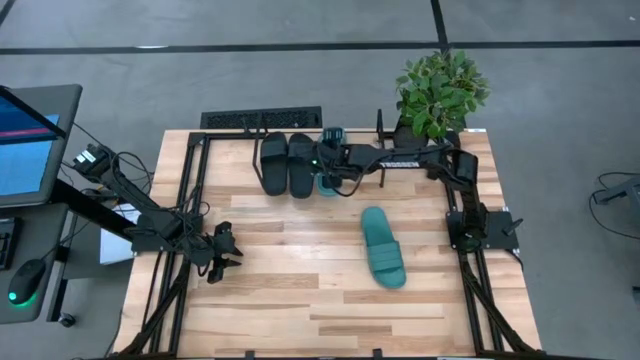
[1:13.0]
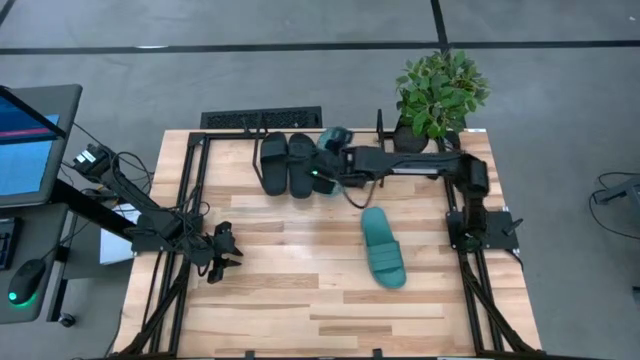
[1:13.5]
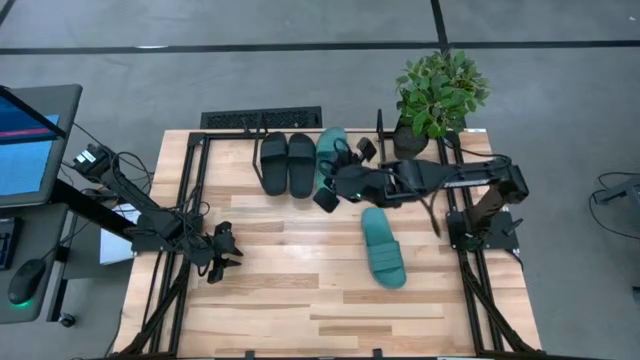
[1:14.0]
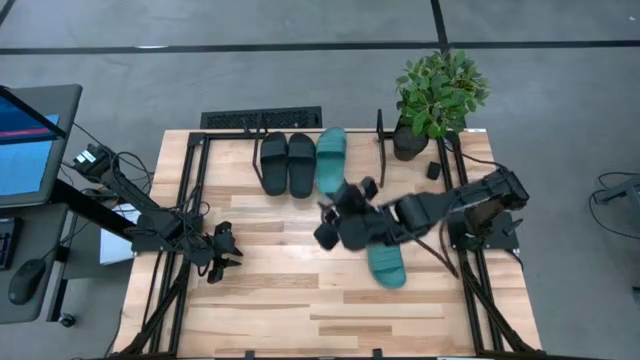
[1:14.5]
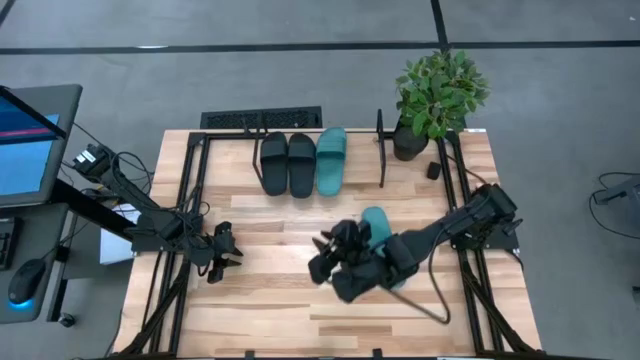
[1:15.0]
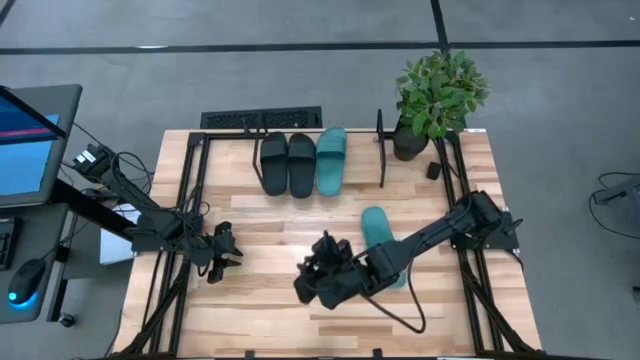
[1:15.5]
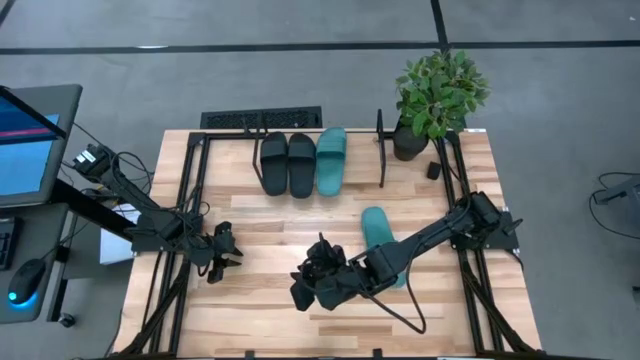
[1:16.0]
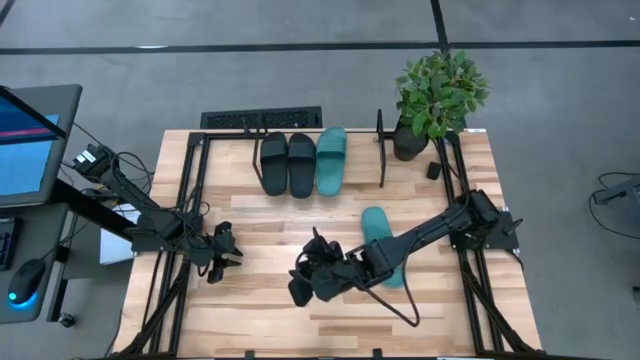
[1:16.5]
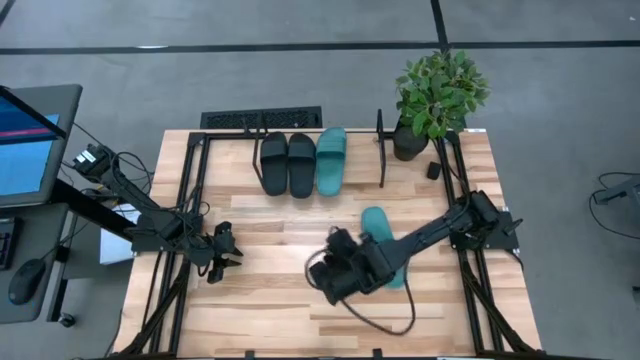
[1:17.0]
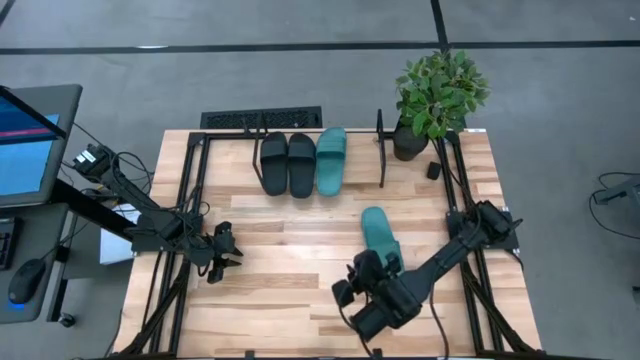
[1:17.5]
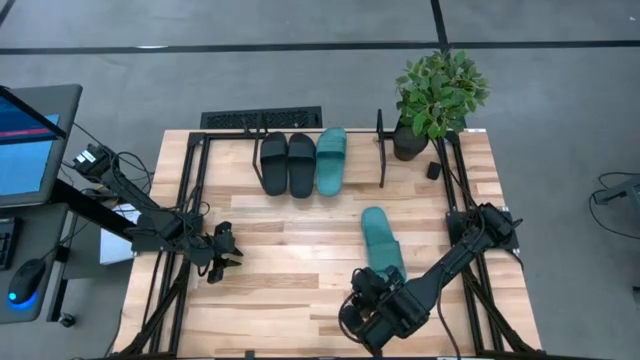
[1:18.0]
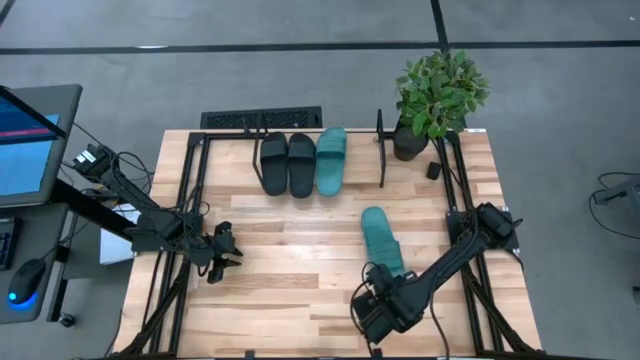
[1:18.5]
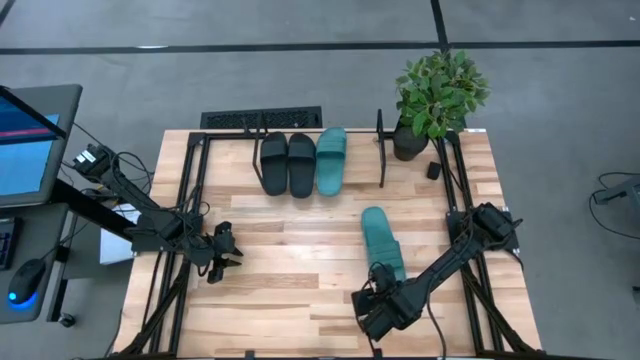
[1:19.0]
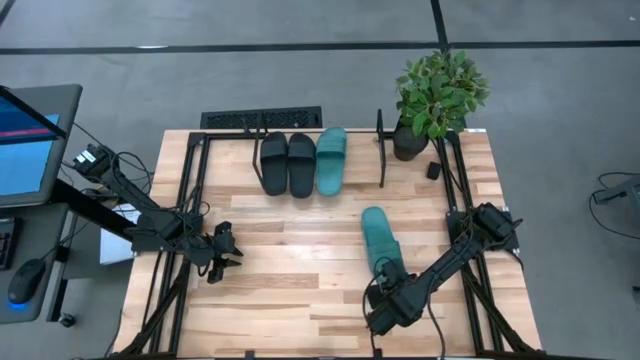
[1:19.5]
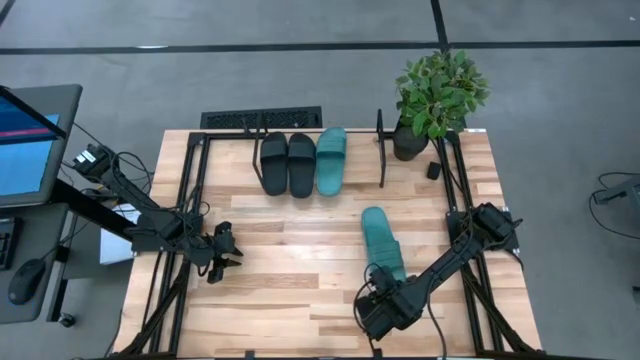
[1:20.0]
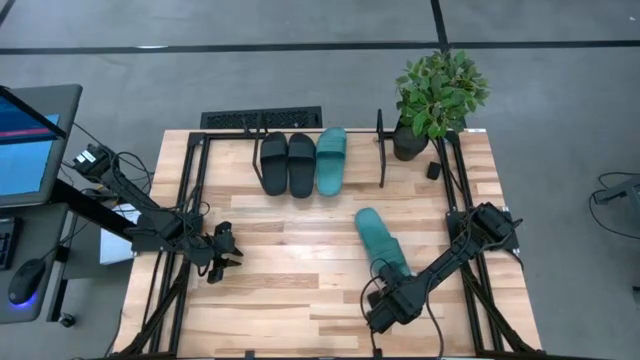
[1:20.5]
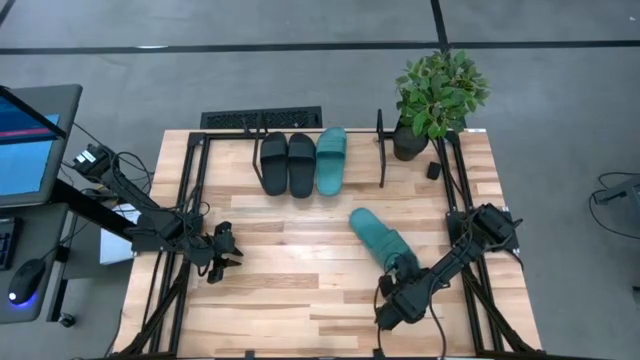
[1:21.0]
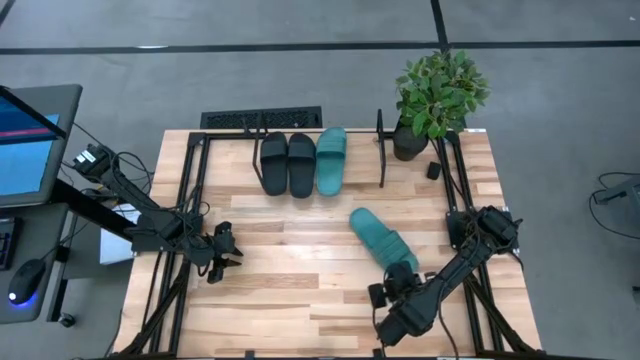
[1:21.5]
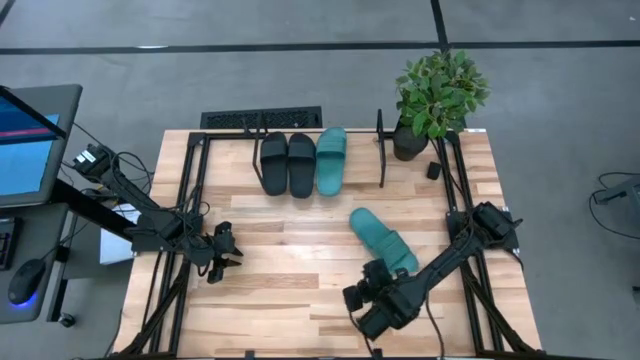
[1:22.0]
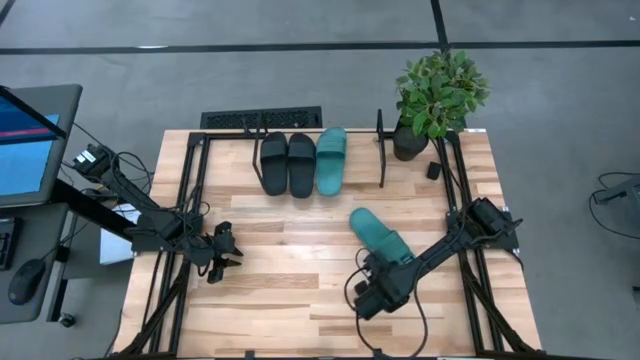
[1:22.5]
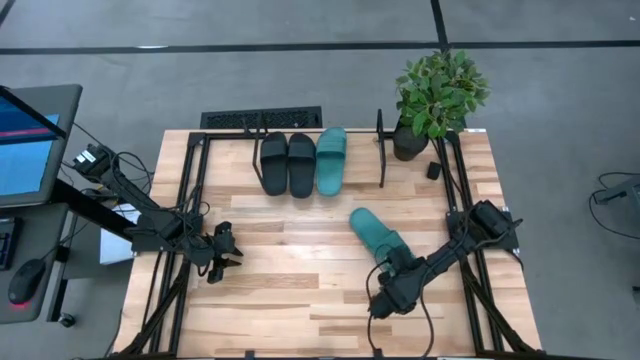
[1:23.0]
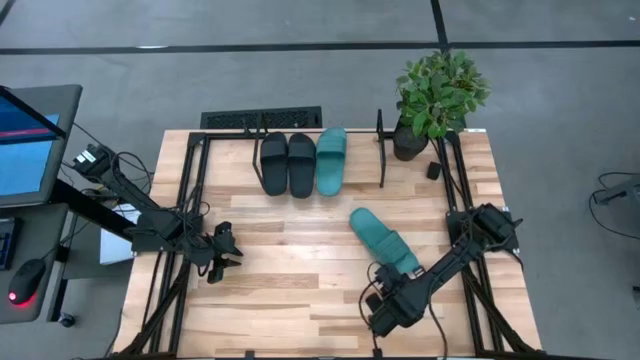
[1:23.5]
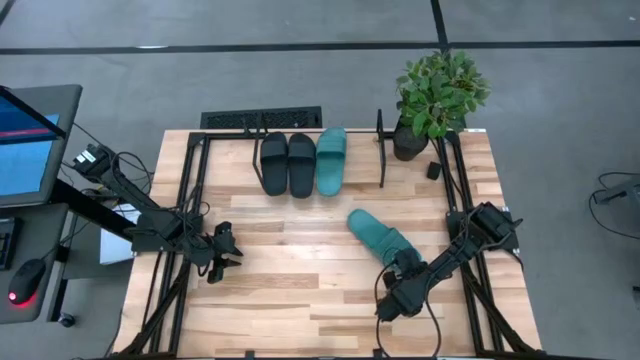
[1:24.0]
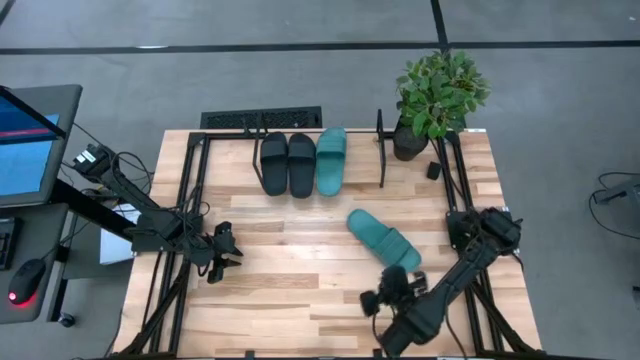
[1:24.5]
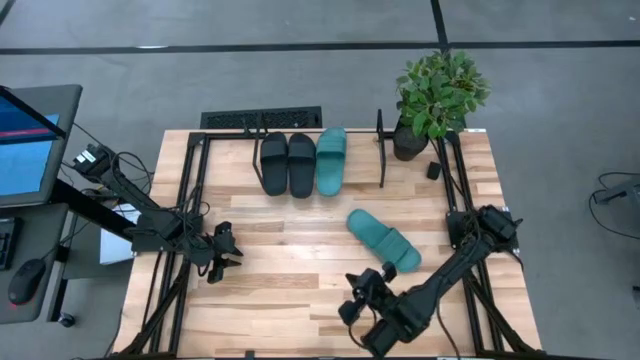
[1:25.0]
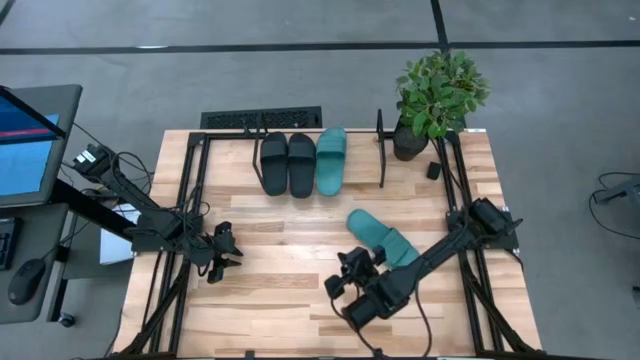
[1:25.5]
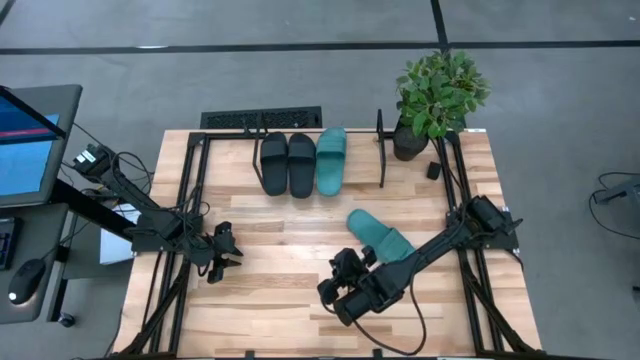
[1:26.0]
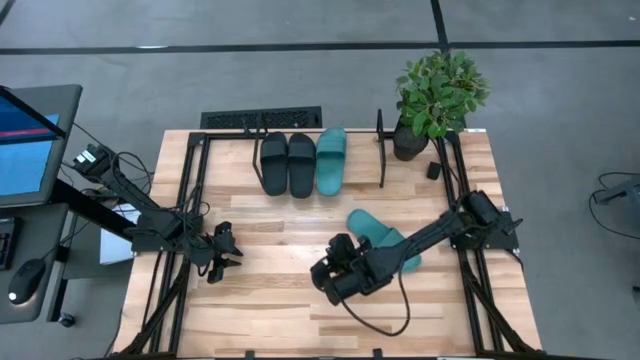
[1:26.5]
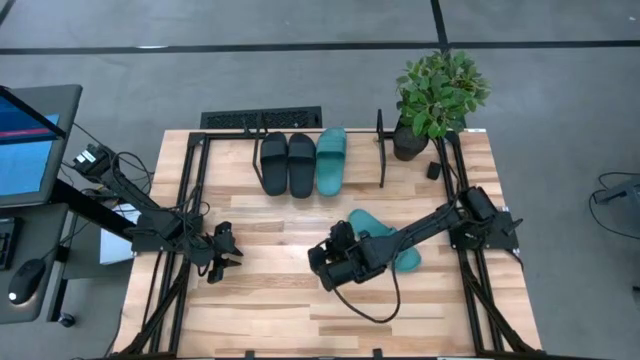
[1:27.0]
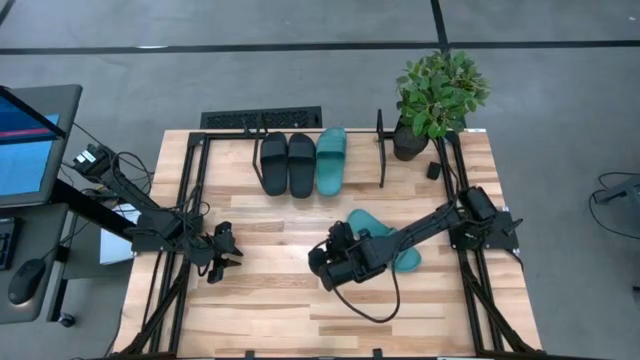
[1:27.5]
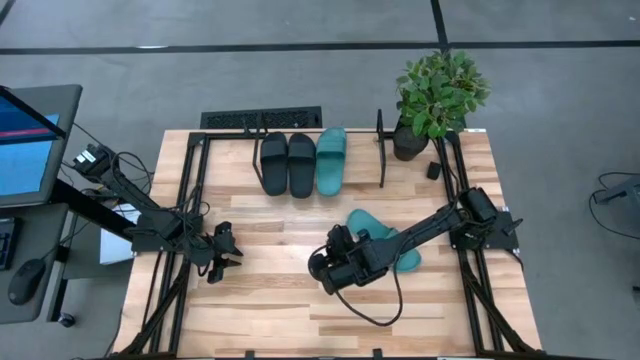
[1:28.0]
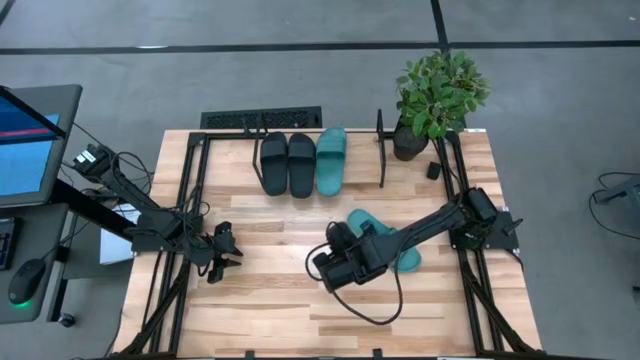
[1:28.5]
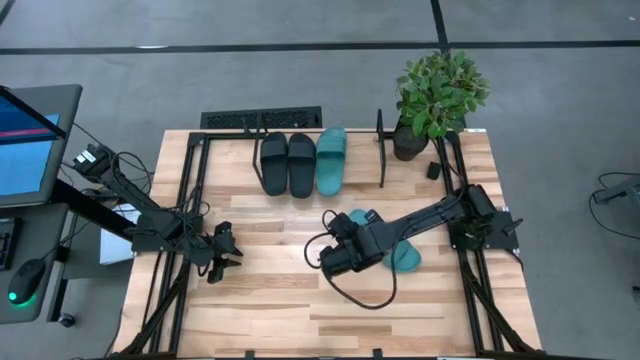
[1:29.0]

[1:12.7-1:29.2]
Task: Pick and place slides into the shelf
Put green slide on the shelf

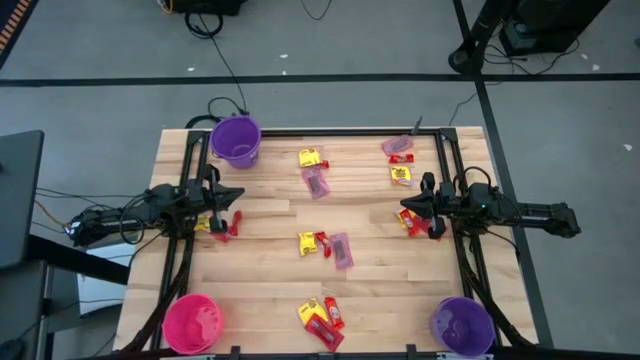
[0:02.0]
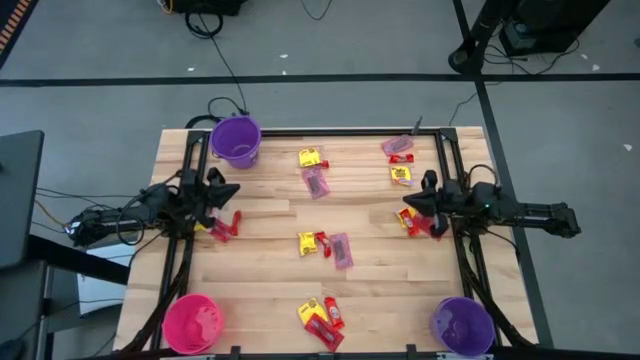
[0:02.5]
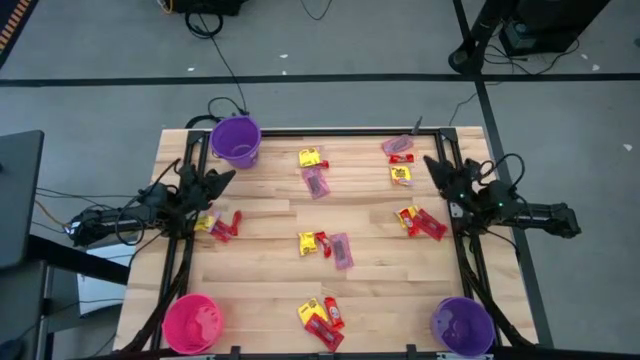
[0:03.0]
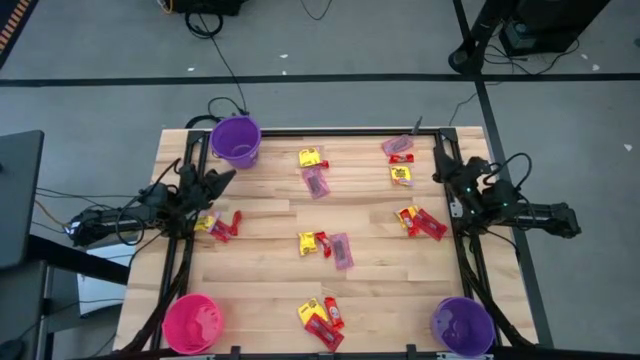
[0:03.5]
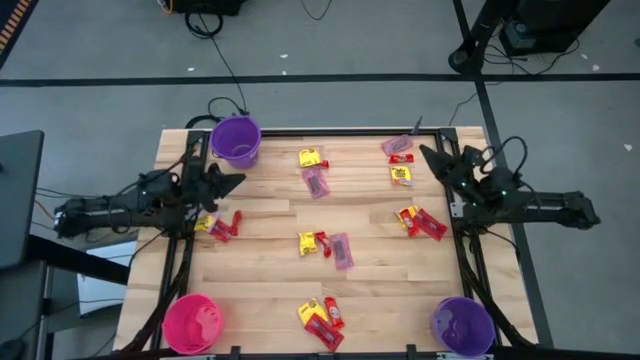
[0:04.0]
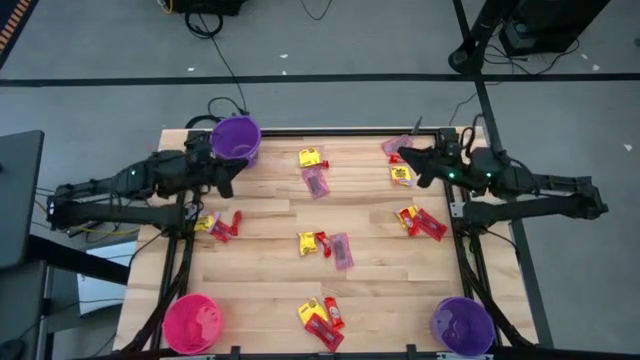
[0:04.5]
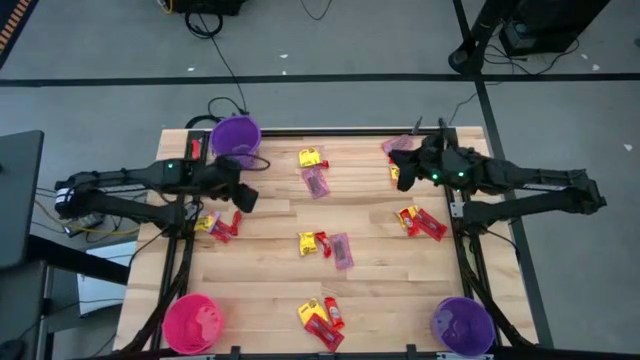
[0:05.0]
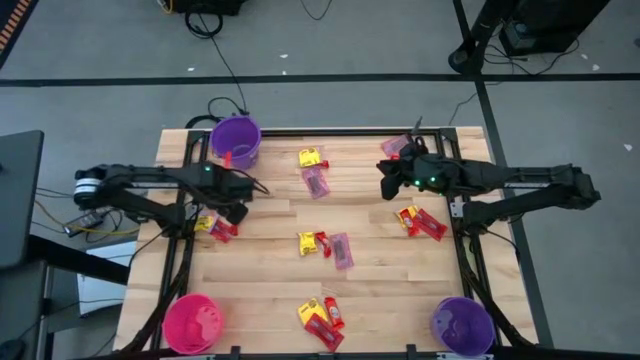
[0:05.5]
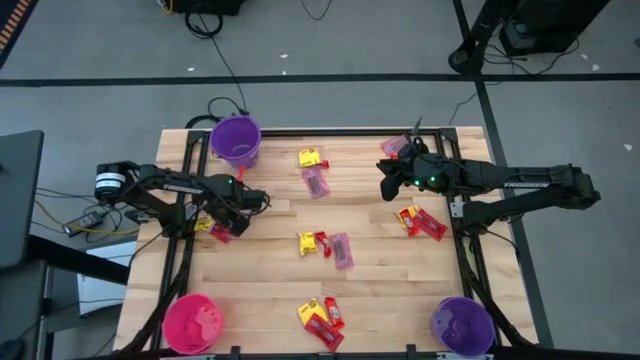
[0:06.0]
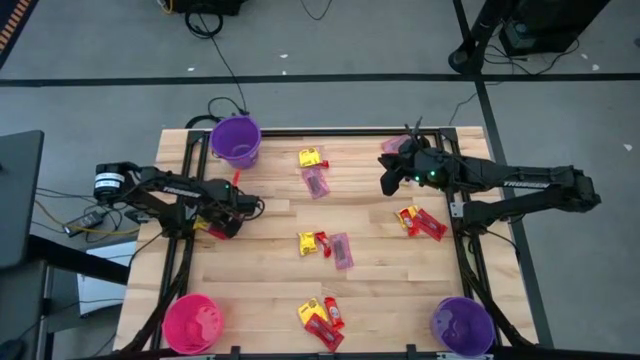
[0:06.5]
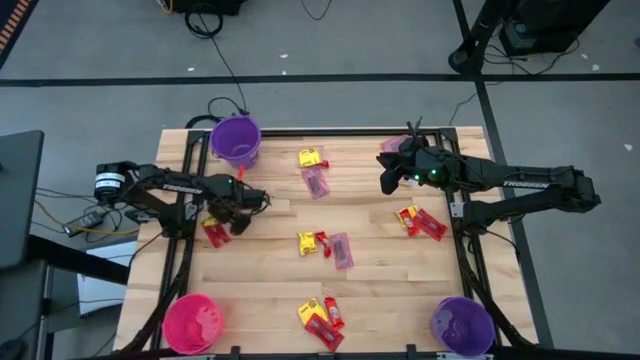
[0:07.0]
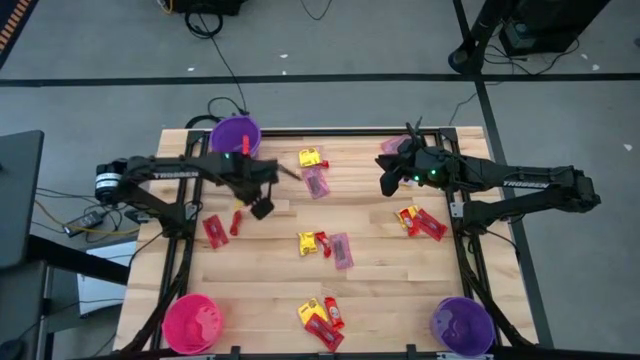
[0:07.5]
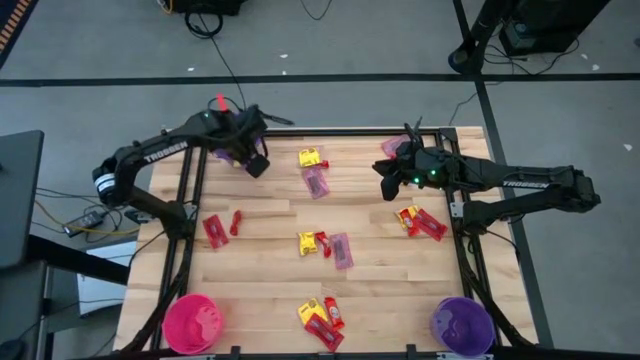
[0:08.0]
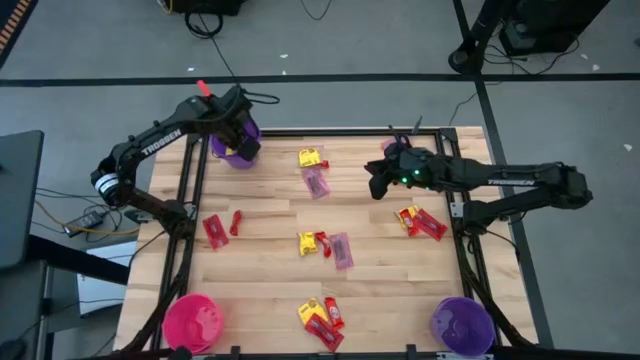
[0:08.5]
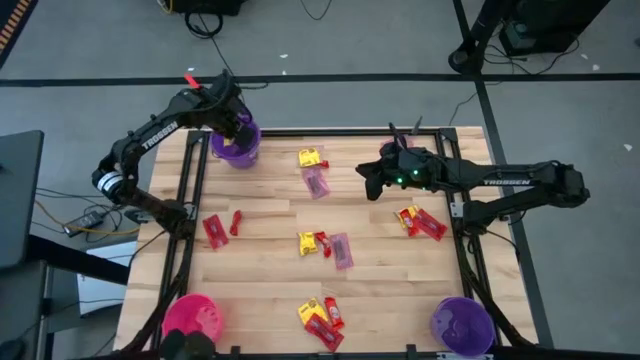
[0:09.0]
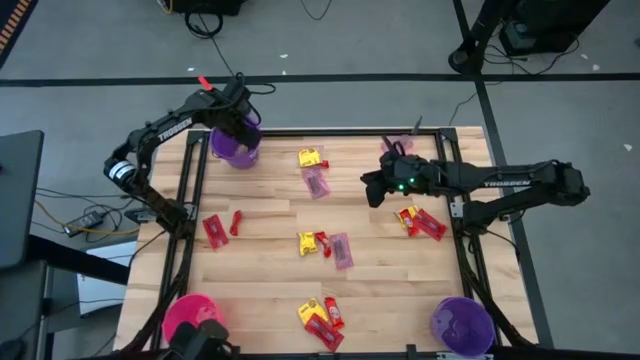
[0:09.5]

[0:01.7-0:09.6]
Task: Sort candy by brand, put in halloween buckets
Put the yellow candy into the top purple bucket
